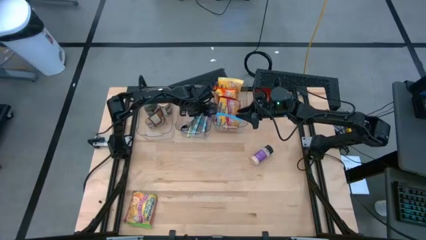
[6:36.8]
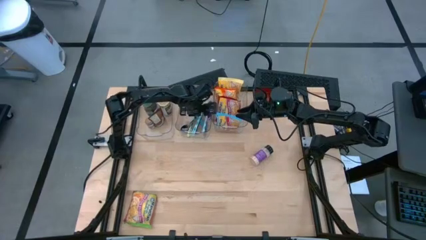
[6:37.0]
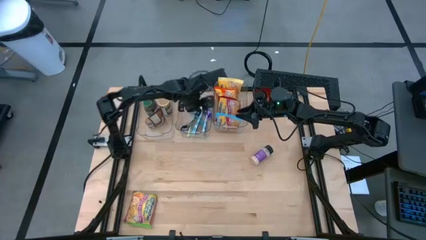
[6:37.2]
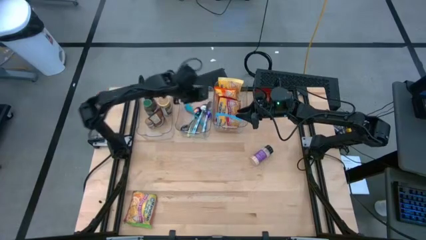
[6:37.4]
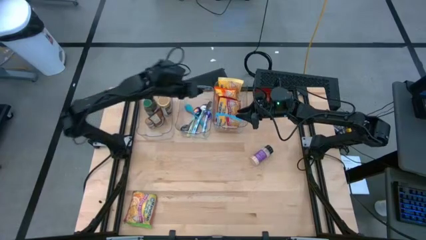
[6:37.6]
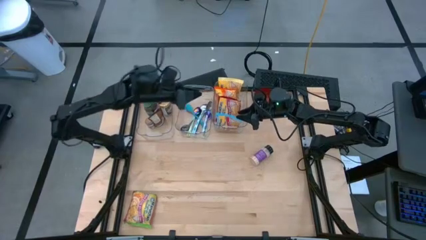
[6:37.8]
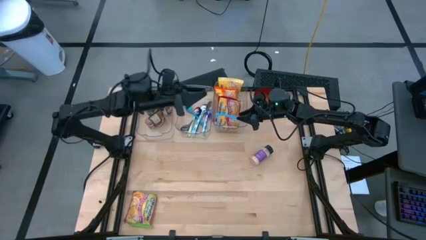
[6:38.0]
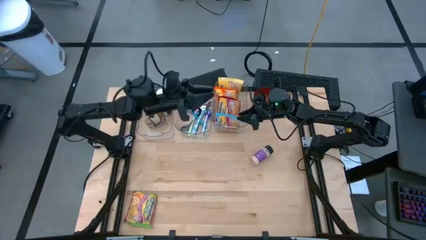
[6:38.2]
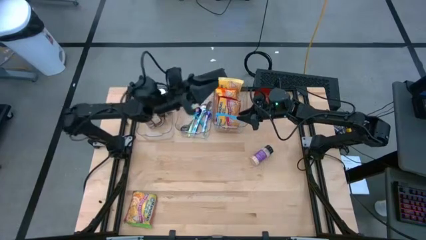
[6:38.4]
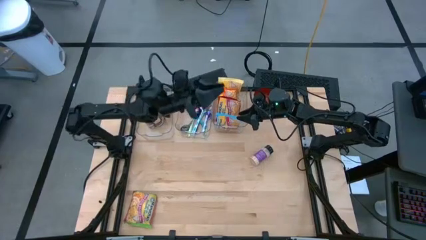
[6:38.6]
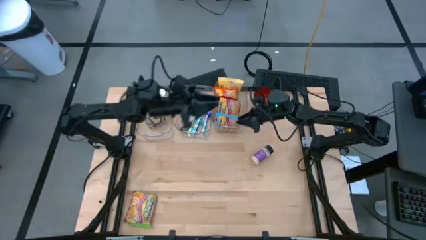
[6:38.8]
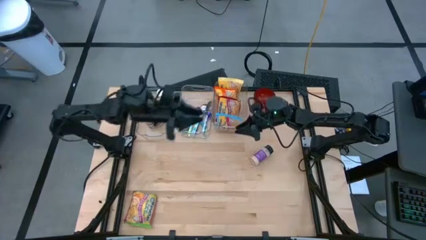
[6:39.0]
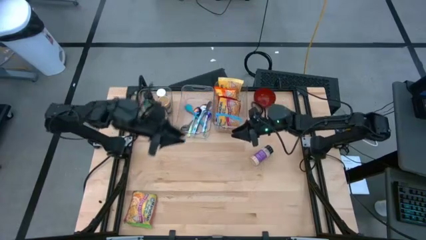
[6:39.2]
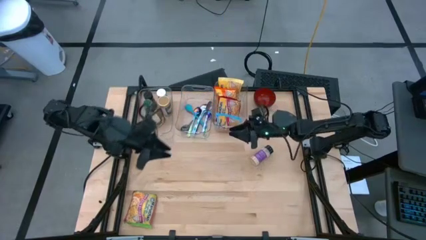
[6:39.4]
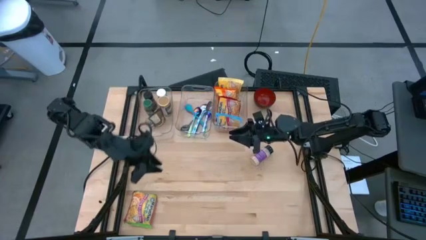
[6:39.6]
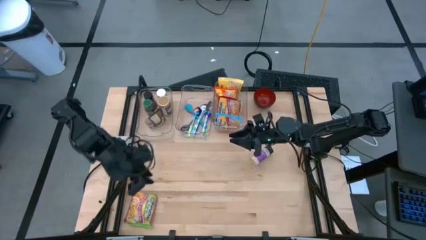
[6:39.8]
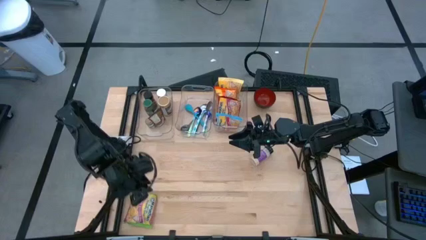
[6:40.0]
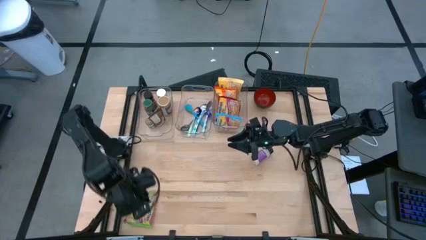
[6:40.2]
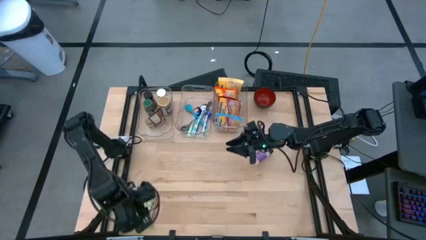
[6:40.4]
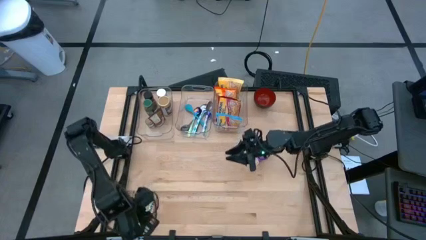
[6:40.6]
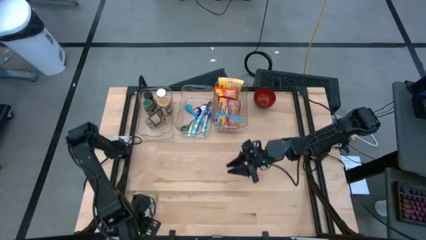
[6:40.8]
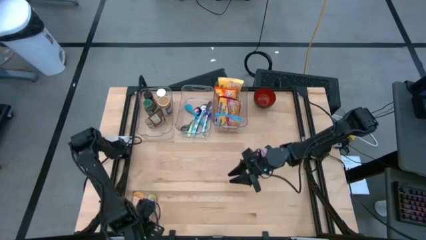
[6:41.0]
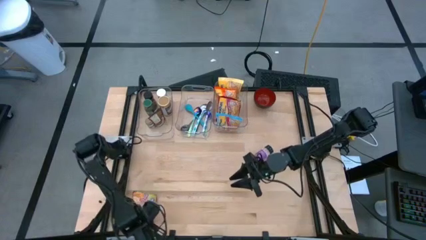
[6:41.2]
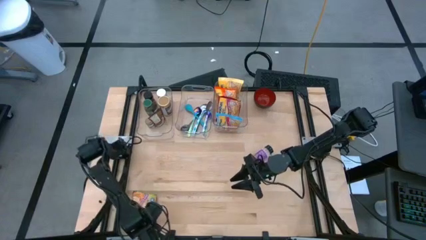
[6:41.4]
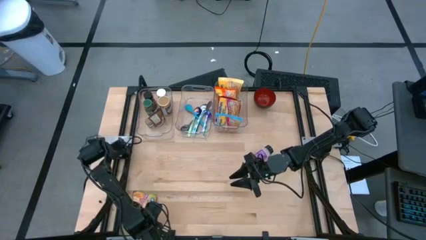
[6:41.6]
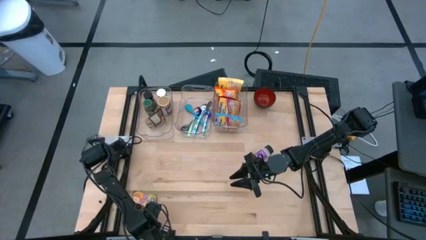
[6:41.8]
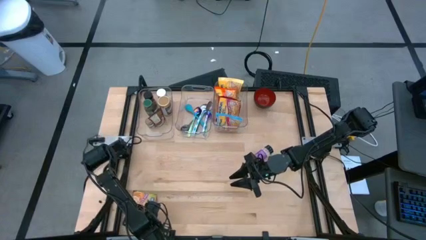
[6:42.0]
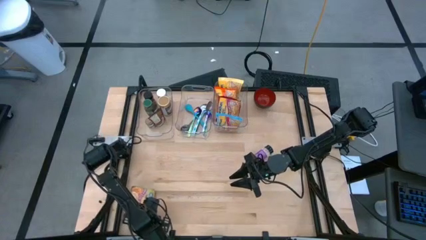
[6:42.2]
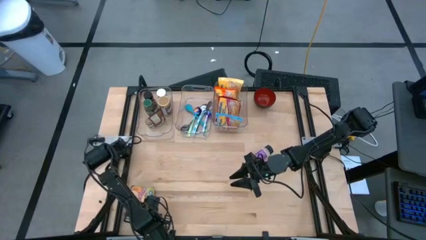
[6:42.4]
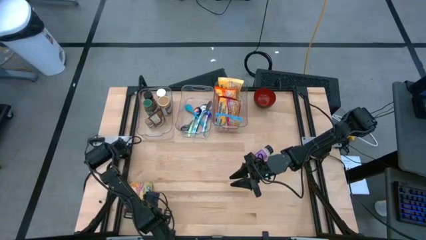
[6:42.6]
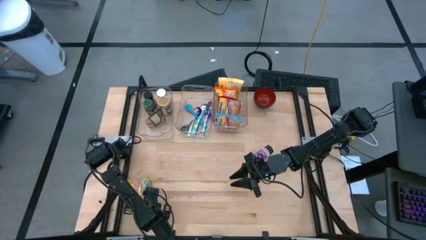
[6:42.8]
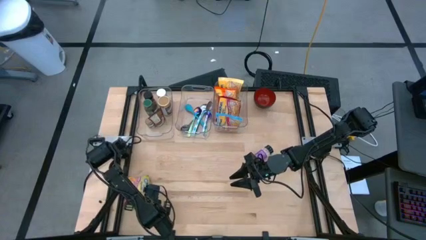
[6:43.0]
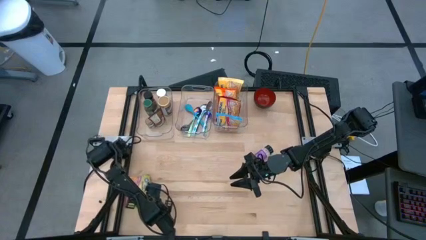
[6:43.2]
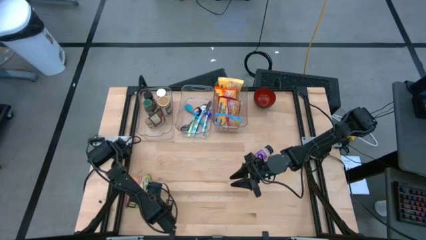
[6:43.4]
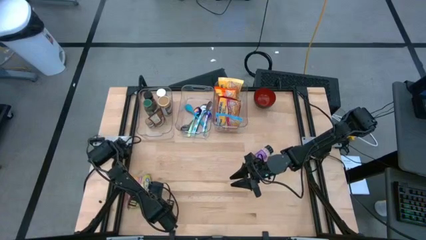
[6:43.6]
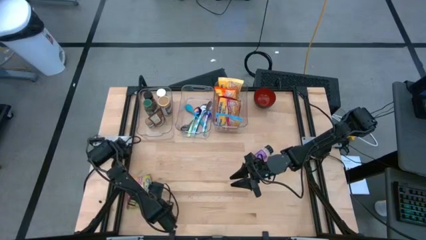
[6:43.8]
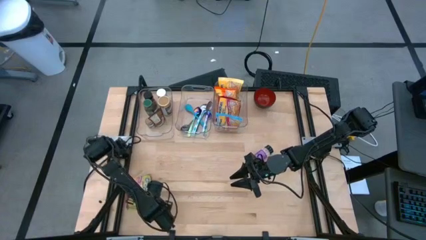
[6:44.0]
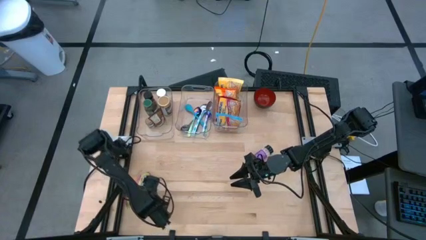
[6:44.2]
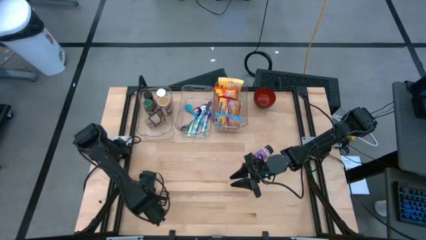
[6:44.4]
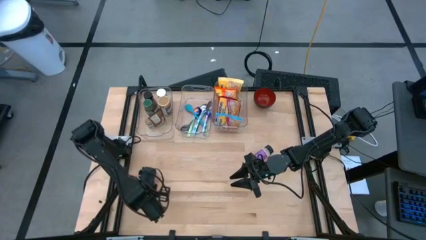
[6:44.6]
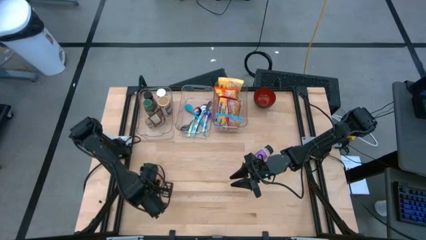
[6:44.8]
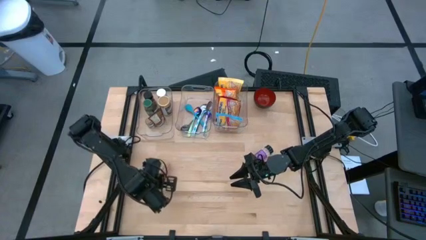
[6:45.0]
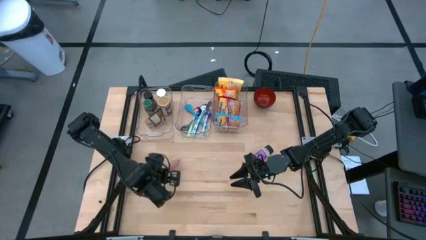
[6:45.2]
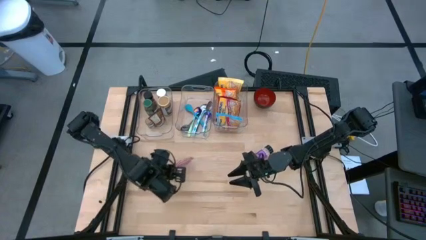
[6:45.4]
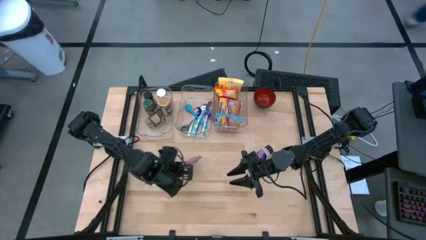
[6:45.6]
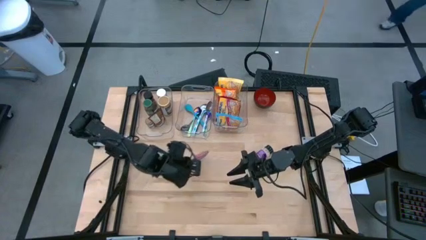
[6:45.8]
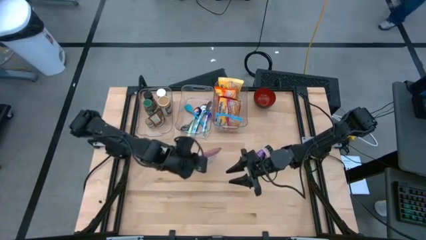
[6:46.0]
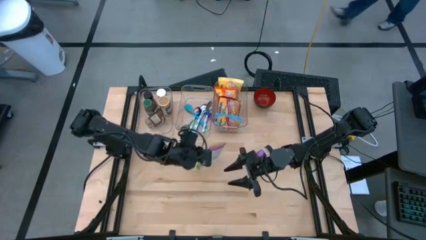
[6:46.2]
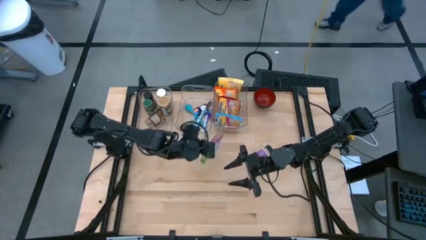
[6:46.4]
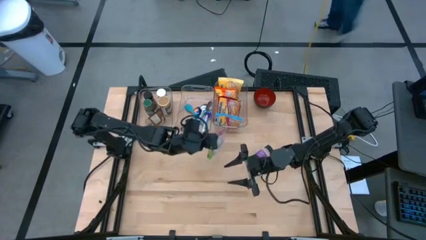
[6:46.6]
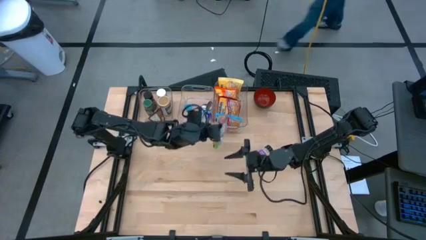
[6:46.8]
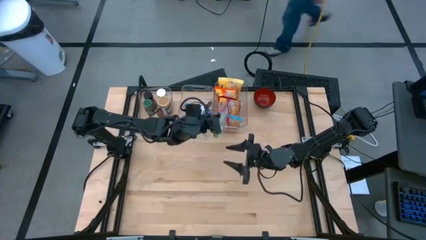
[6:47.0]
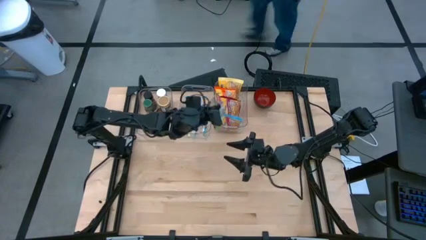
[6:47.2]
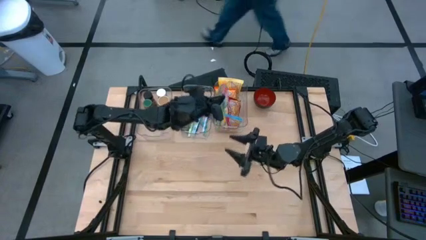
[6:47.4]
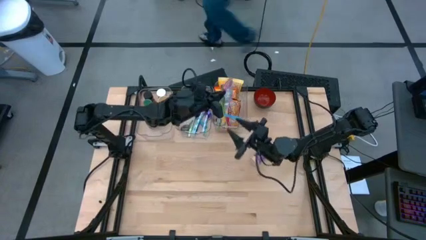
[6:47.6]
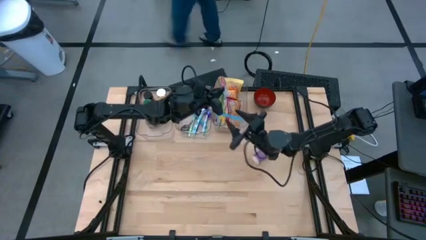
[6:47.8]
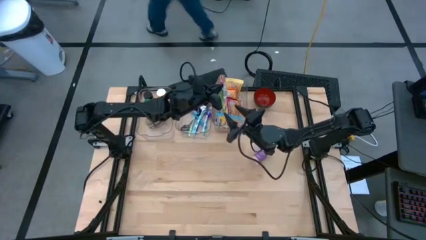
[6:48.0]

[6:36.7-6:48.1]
Task: Pick & Place Food Item
Put the green noodle pack into the right transparent bin
